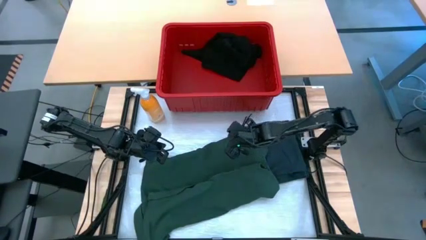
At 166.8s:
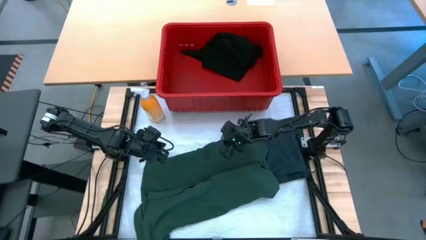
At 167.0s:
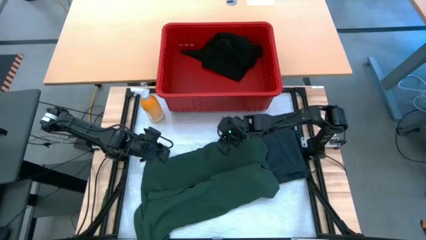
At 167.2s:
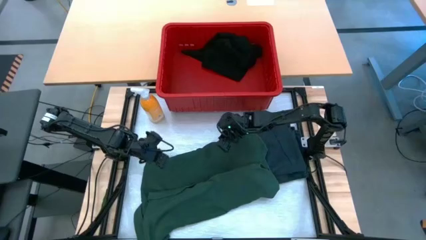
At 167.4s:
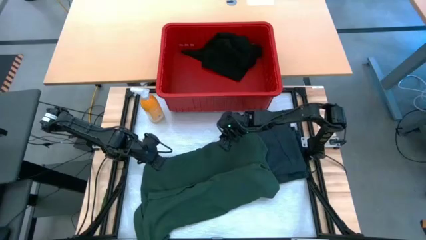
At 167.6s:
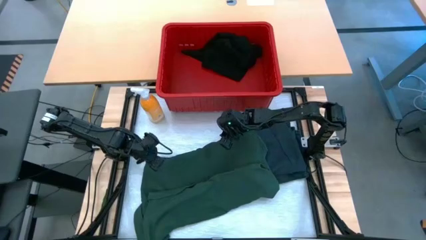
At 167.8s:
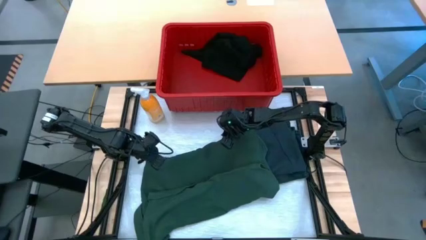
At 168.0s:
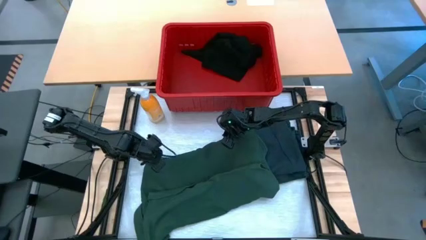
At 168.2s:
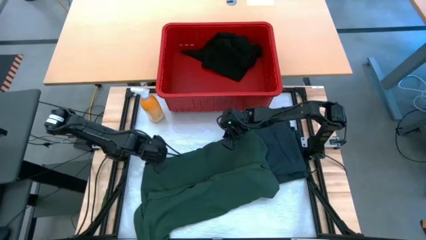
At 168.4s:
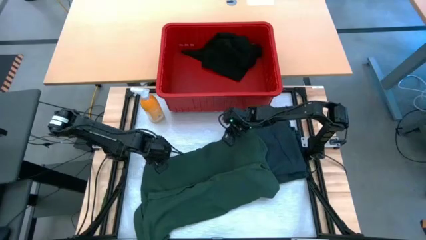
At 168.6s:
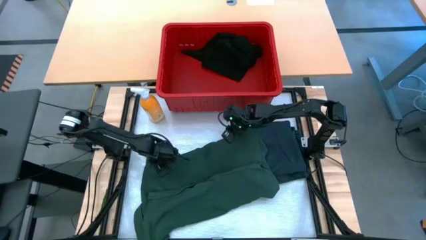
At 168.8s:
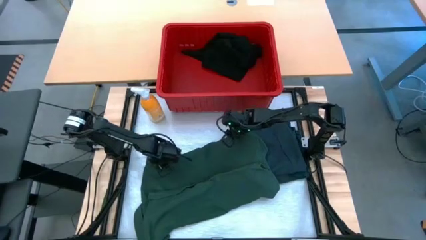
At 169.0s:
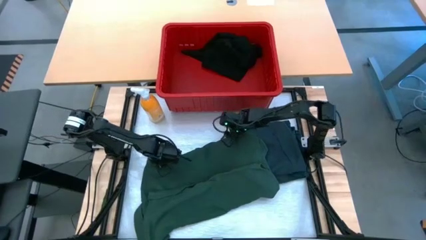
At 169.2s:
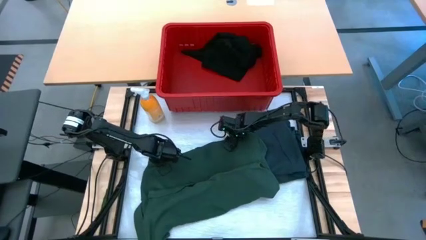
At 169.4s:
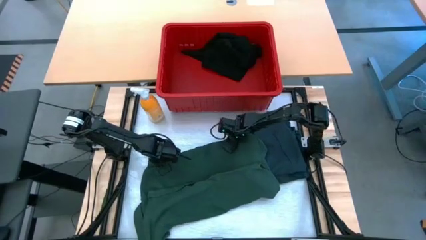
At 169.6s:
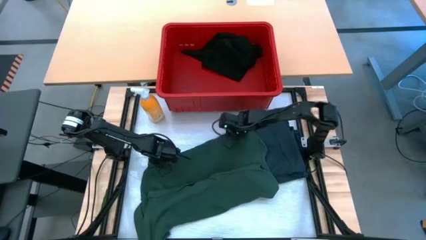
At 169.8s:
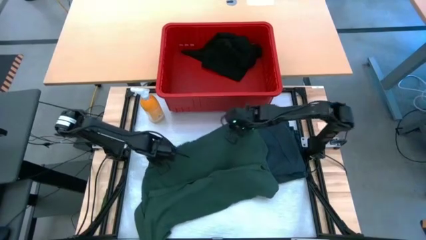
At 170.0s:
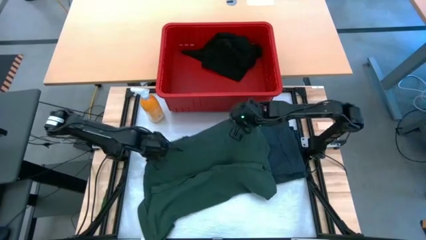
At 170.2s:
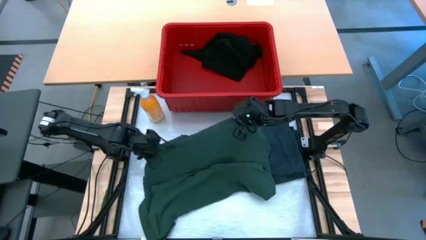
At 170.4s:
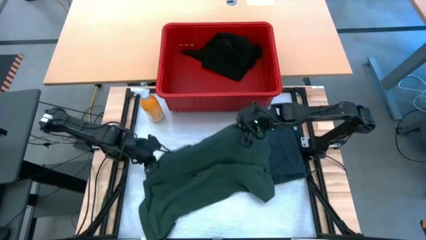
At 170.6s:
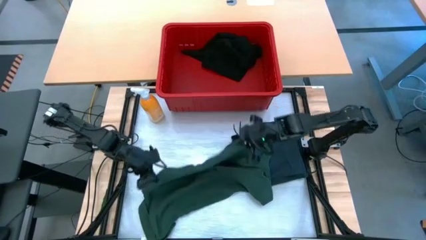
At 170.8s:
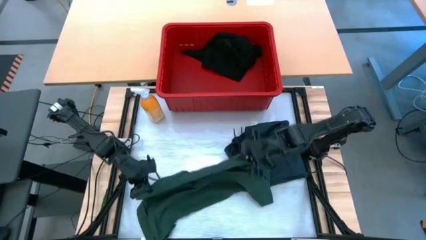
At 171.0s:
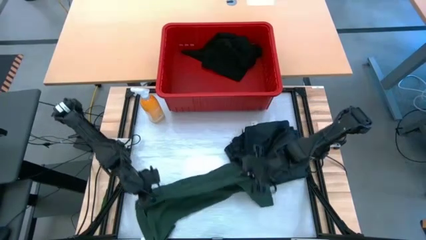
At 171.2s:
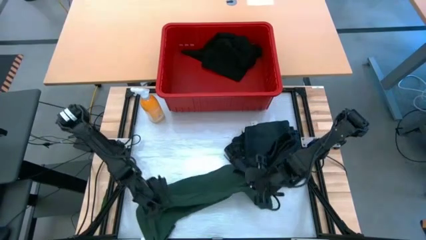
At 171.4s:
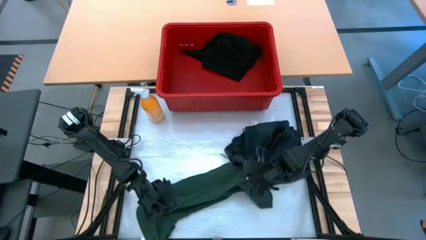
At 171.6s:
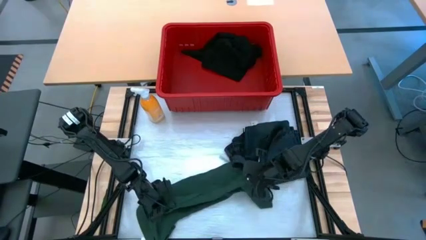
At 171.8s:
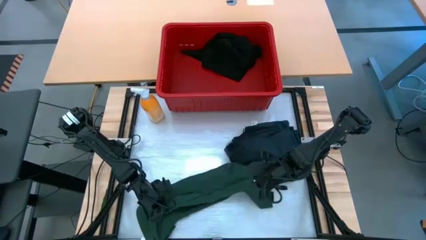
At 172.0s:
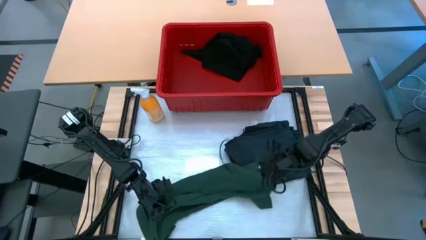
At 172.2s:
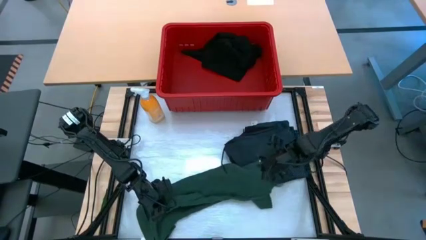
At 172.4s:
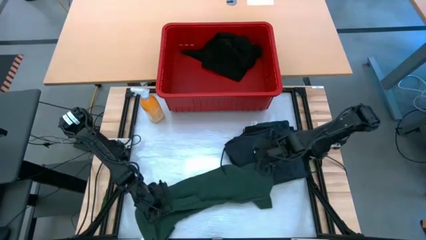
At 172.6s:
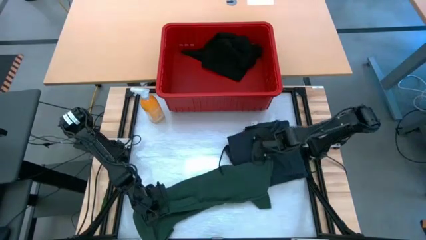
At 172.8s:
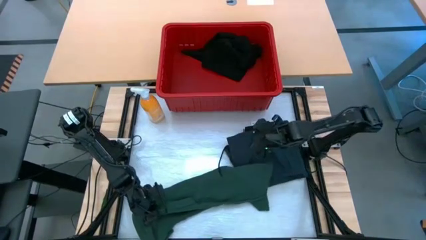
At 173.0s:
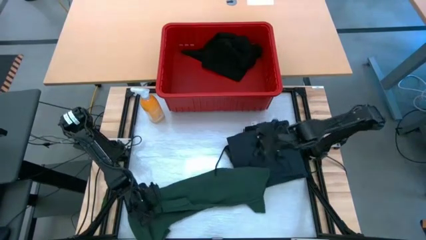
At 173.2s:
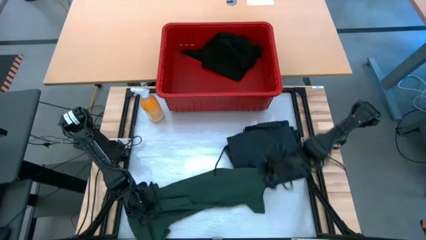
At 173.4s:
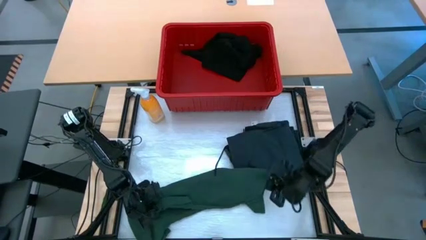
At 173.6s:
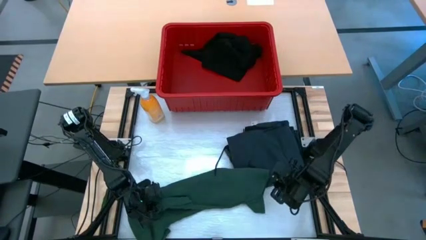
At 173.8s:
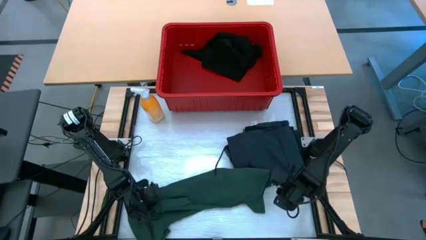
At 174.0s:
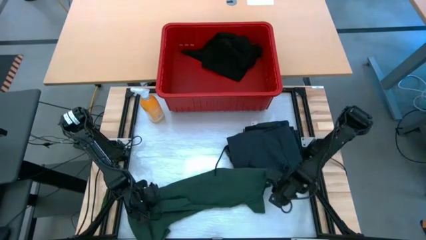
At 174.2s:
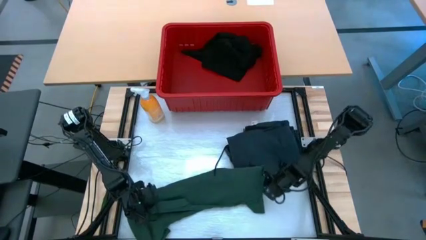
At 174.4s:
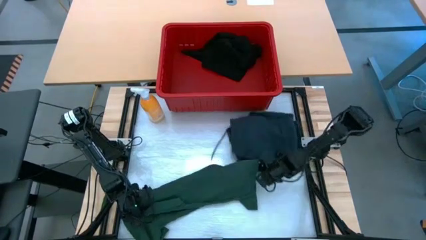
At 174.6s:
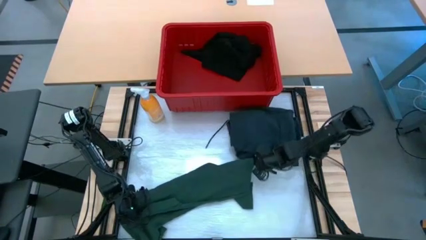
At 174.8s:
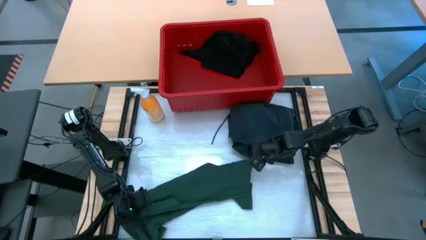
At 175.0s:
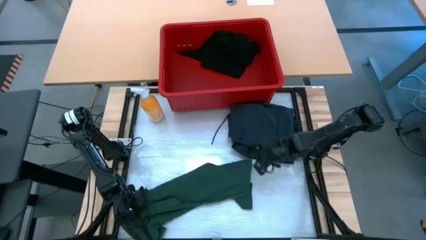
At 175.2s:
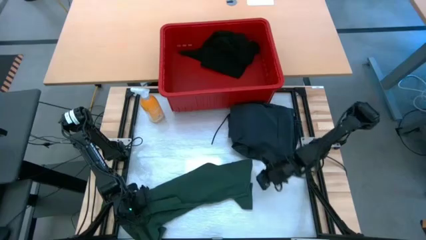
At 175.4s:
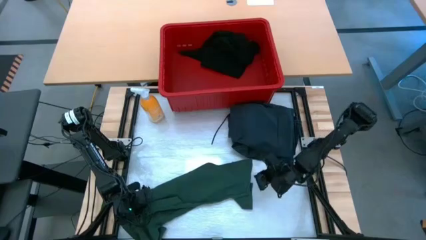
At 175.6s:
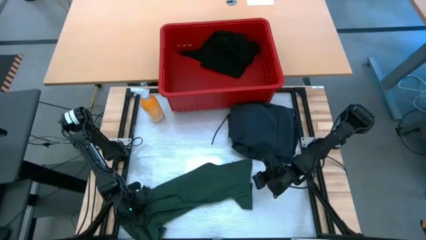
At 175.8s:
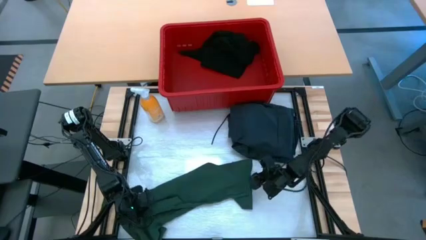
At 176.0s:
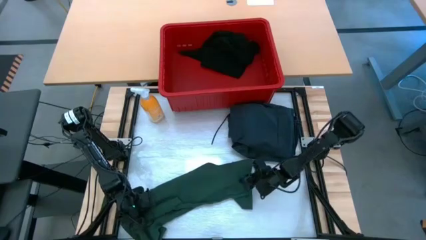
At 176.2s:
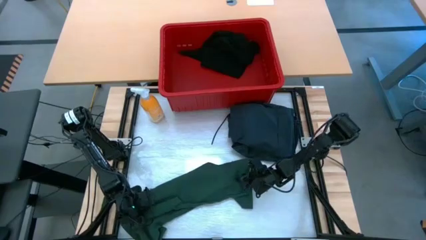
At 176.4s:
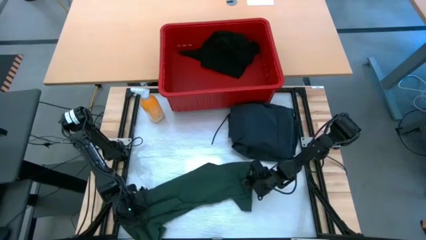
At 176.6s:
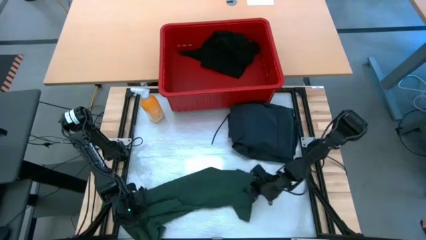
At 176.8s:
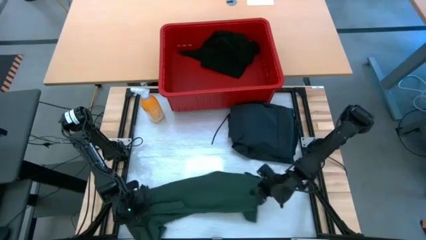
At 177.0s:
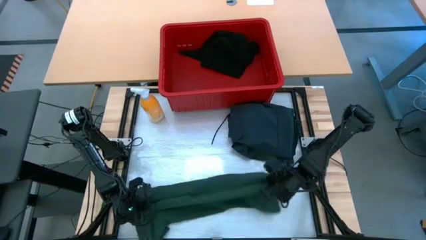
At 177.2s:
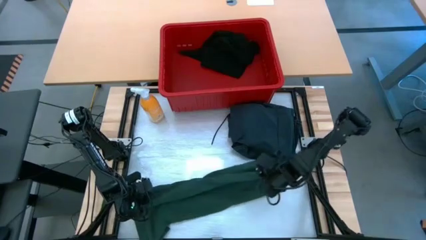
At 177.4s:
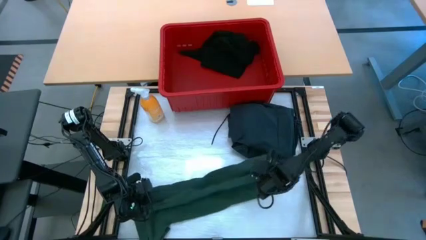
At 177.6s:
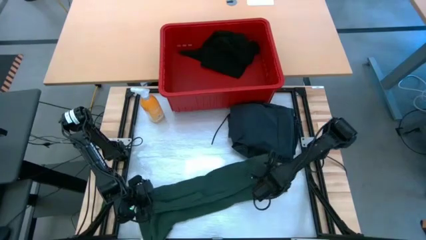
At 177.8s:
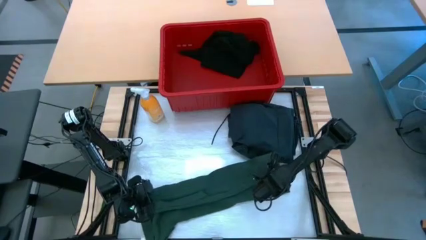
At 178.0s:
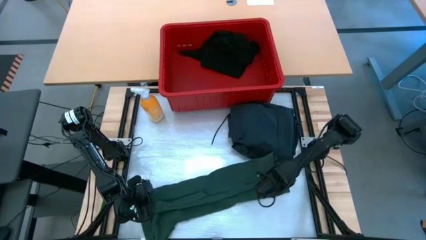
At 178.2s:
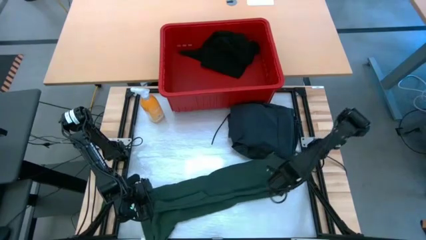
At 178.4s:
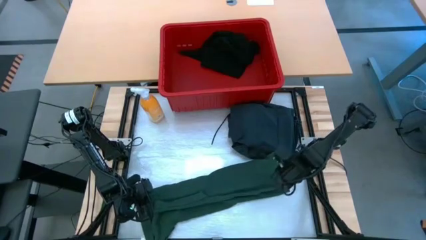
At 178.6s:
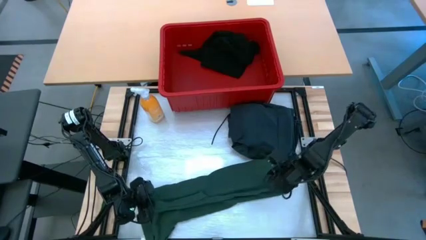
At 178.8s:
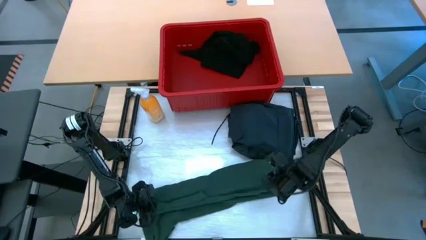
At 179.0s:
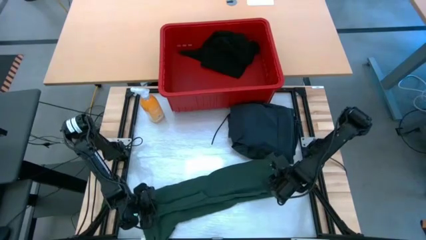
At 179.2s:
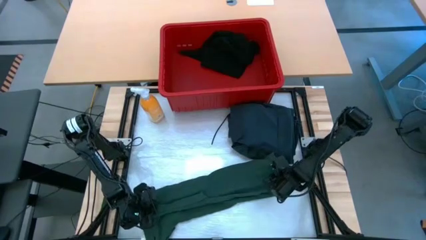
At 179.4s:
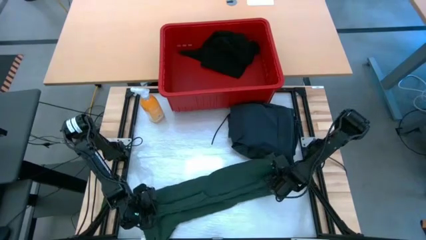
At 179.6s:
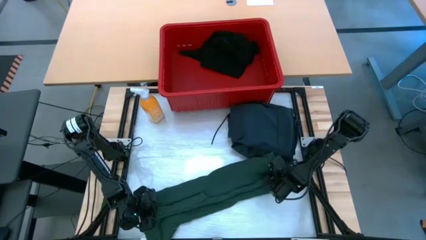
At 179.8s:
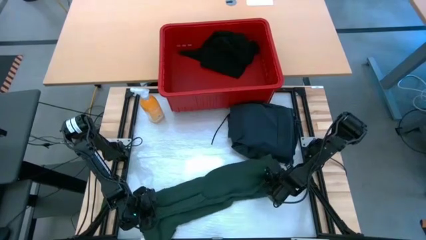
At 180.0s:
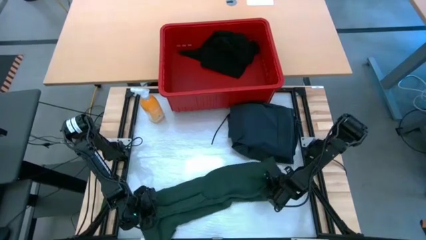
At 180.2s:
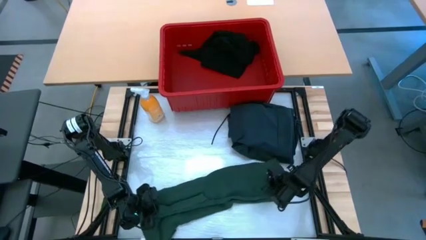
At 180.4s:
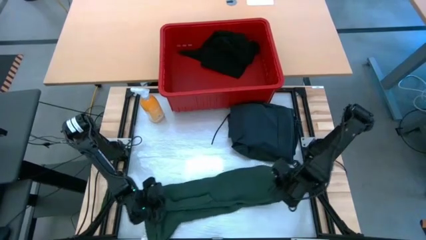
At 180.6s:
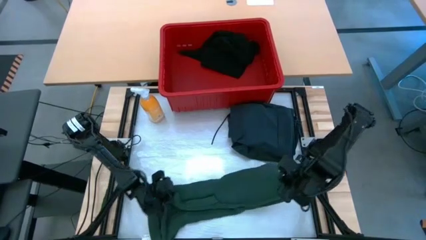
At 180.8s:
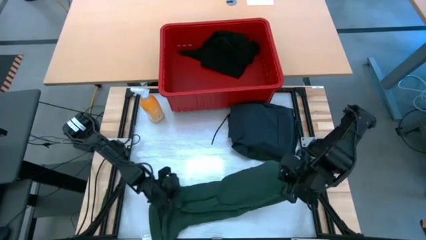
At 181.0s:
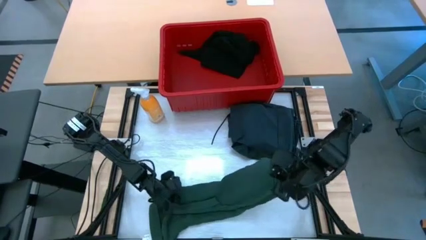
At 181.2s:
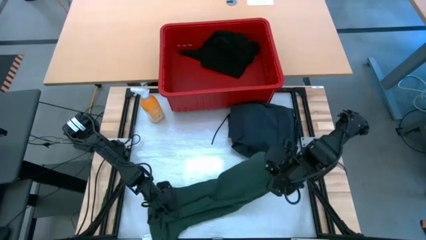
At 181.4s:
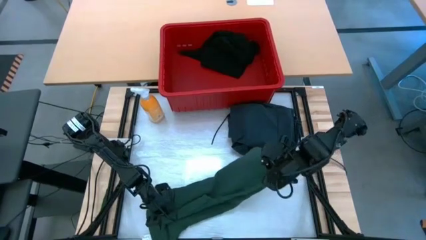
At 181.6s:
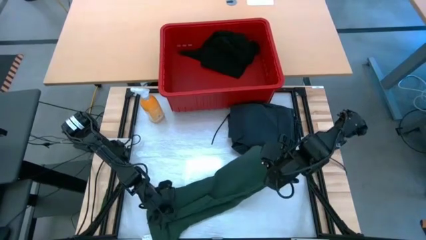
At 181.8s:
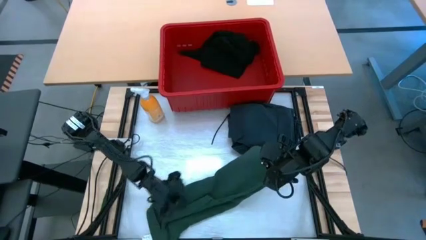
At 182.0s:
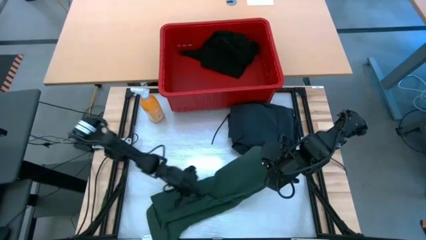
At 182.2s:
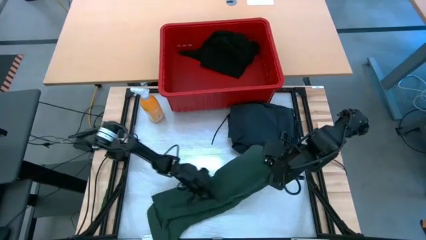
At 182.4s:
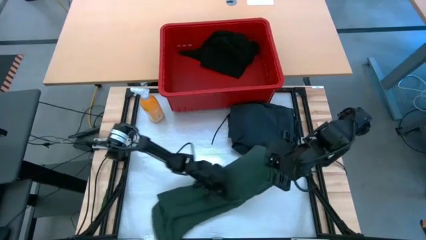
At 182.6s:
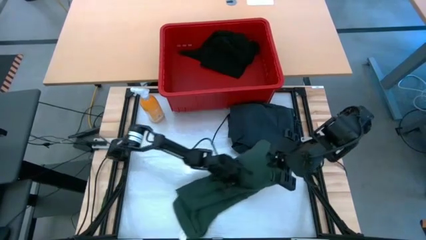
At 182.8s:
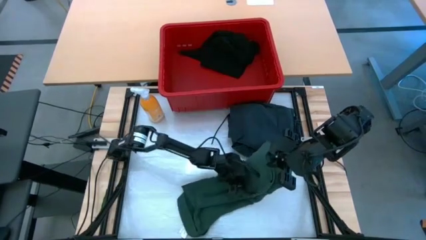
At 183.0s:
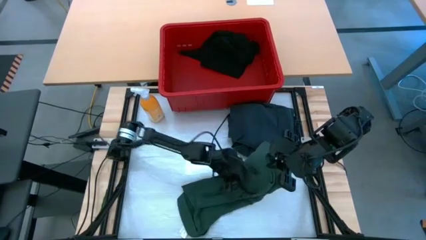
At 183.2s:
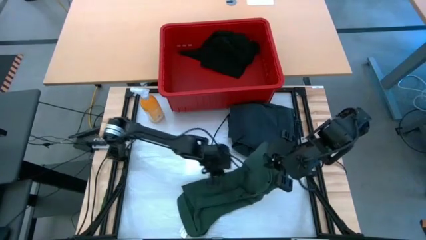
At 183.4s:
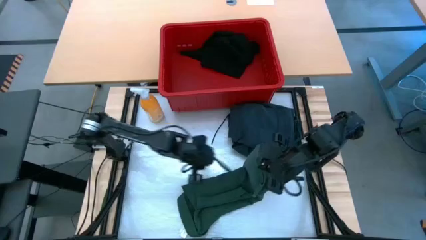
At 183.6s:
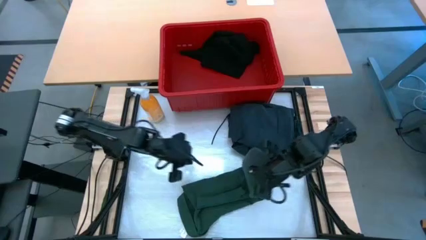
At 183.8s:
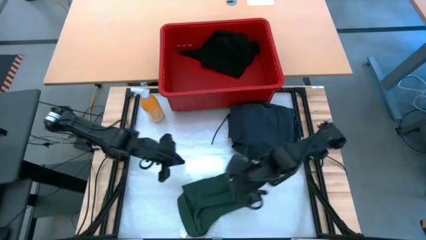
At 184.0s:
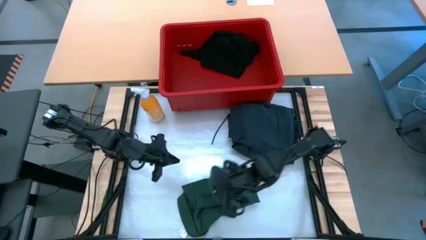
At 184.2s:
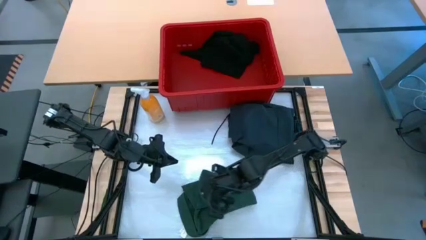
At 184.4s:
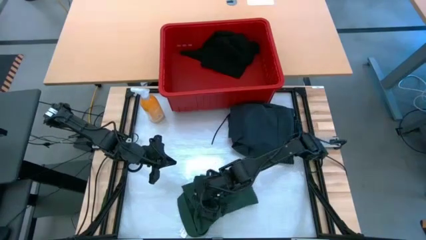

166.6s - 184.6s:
Task: Fold laundry
Fold the green shirt
